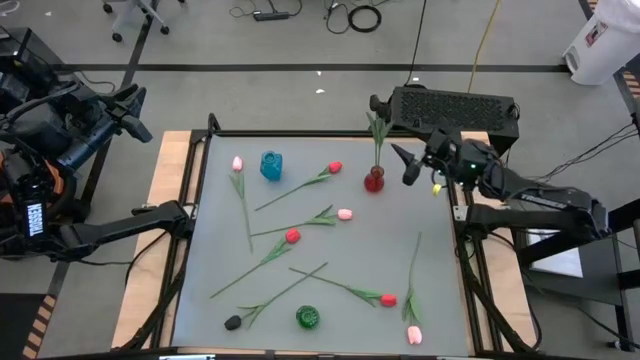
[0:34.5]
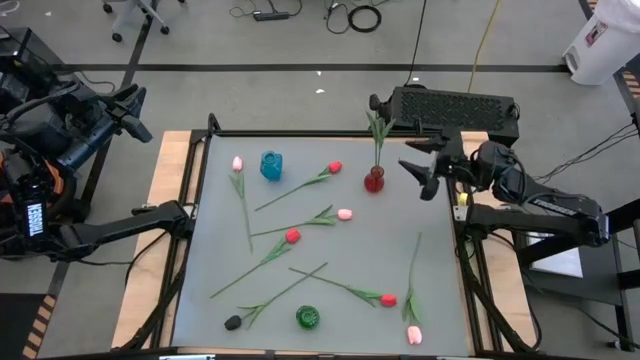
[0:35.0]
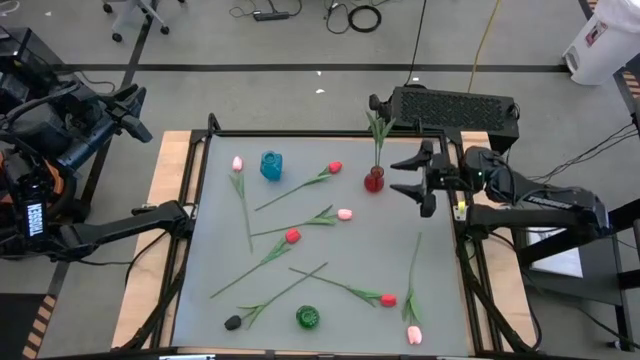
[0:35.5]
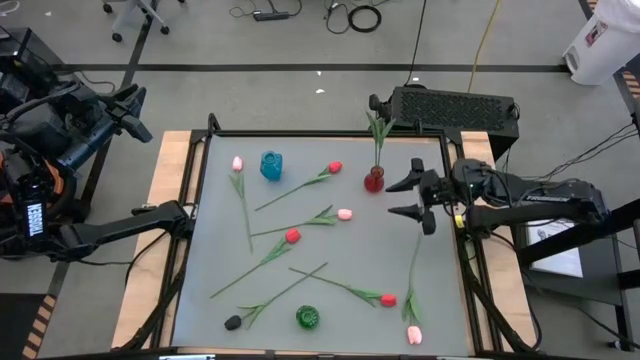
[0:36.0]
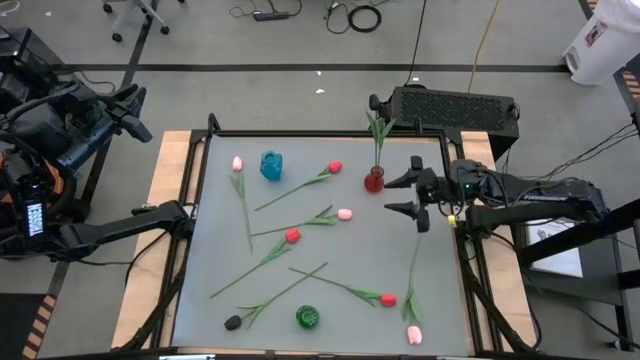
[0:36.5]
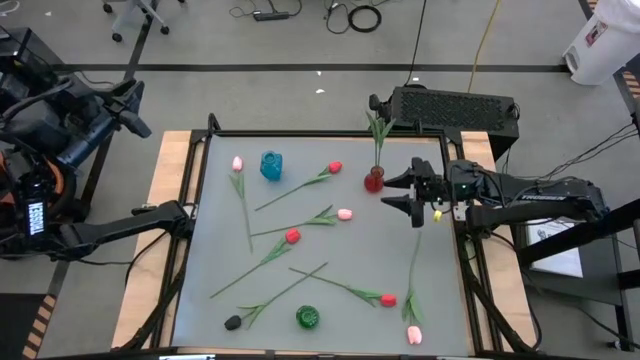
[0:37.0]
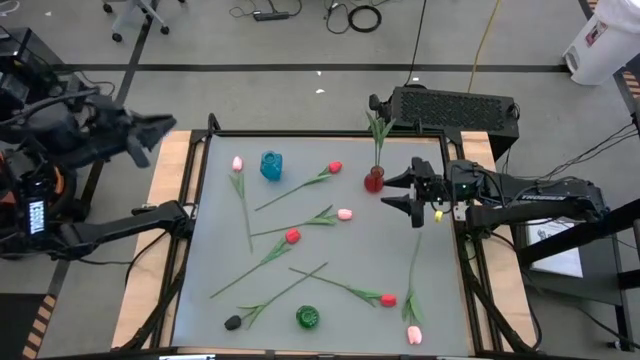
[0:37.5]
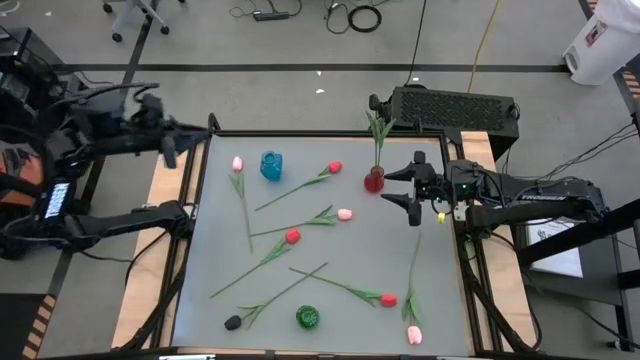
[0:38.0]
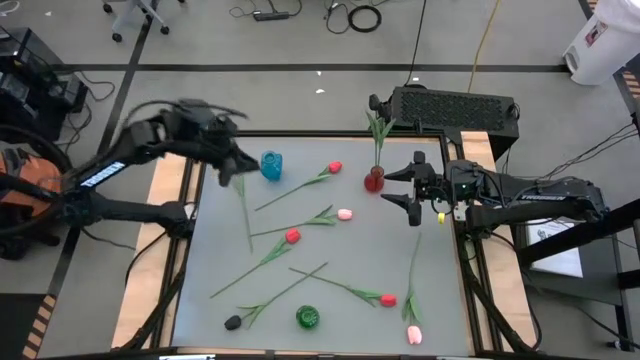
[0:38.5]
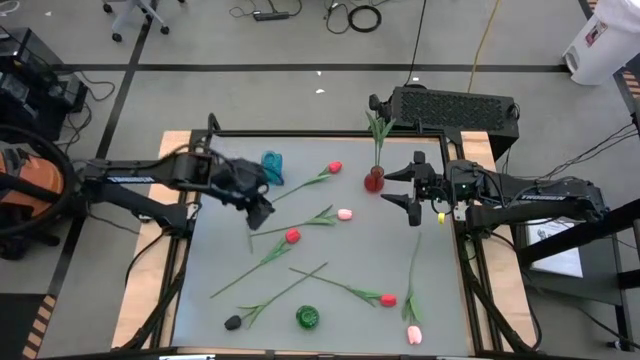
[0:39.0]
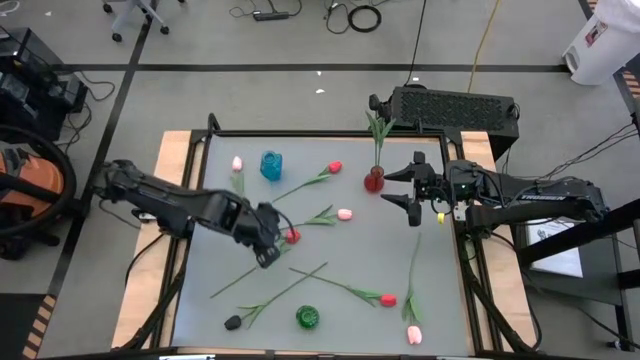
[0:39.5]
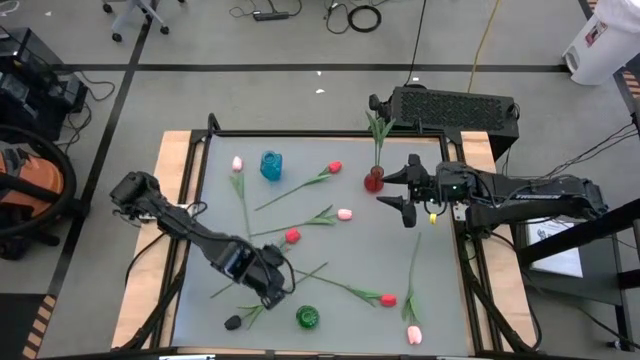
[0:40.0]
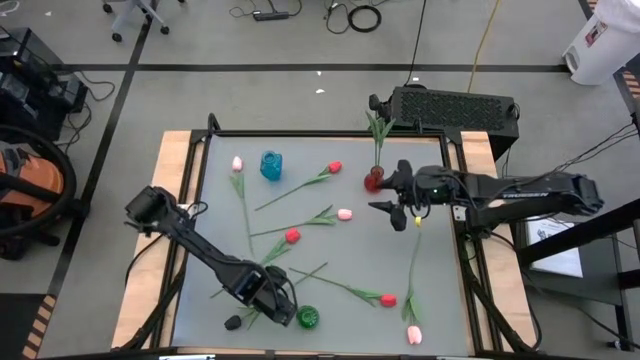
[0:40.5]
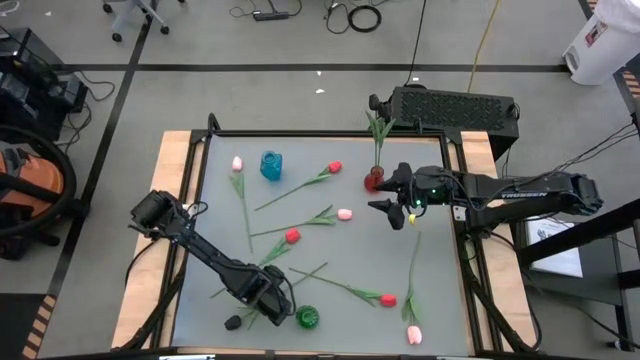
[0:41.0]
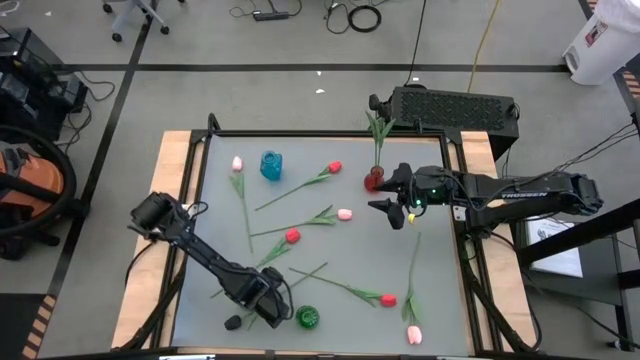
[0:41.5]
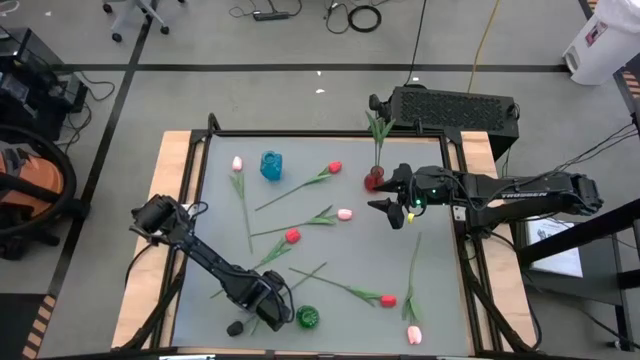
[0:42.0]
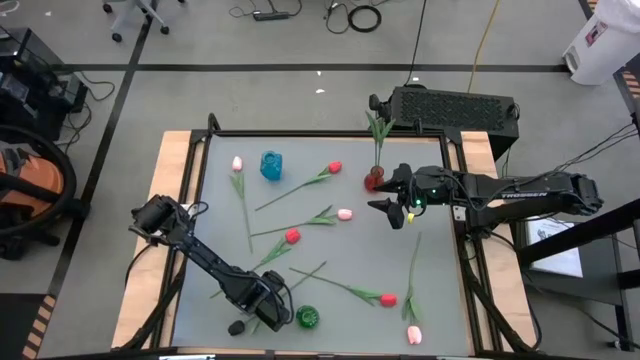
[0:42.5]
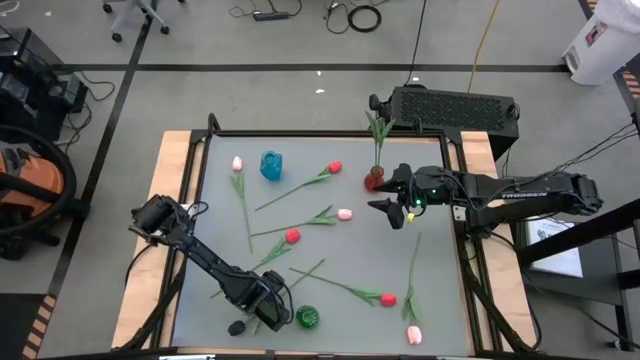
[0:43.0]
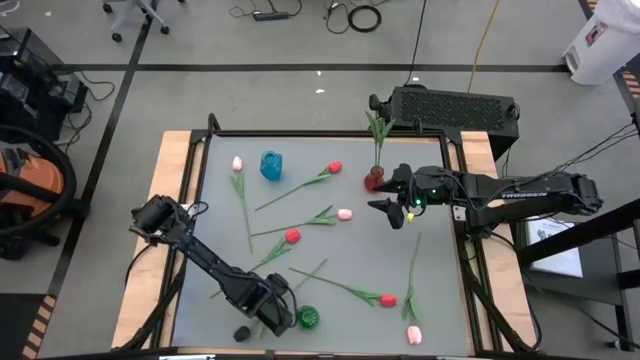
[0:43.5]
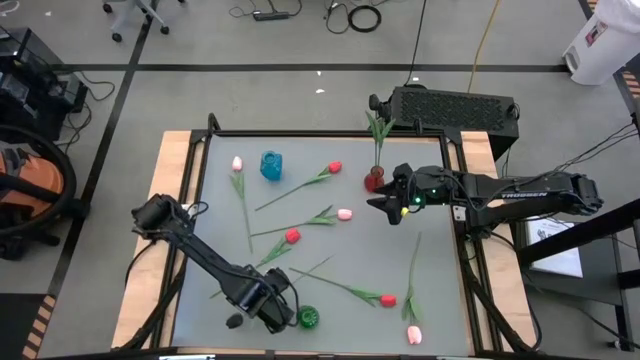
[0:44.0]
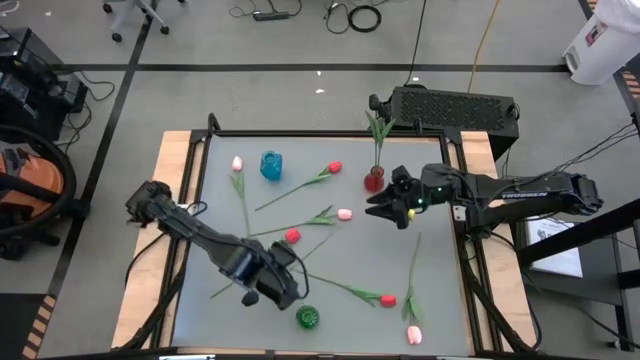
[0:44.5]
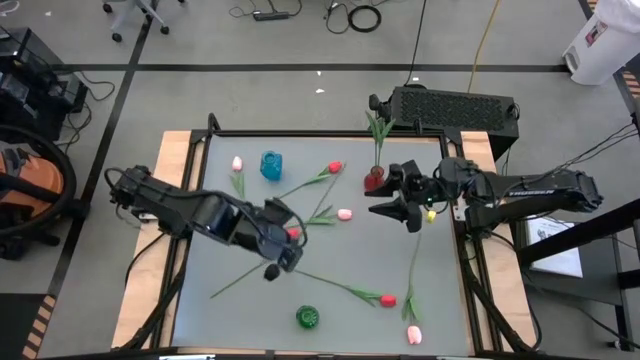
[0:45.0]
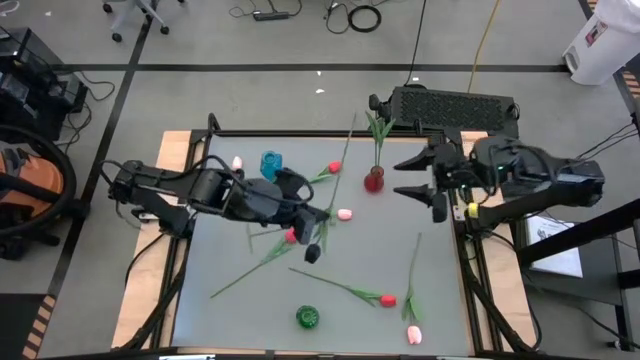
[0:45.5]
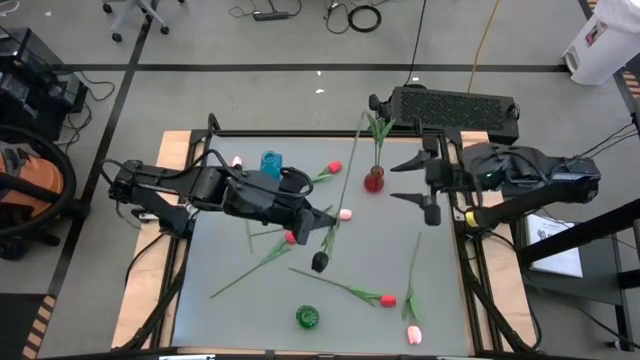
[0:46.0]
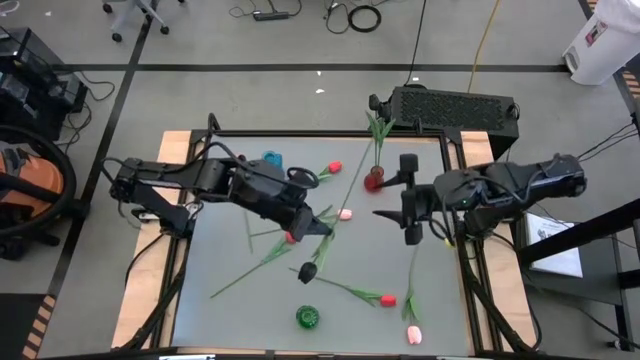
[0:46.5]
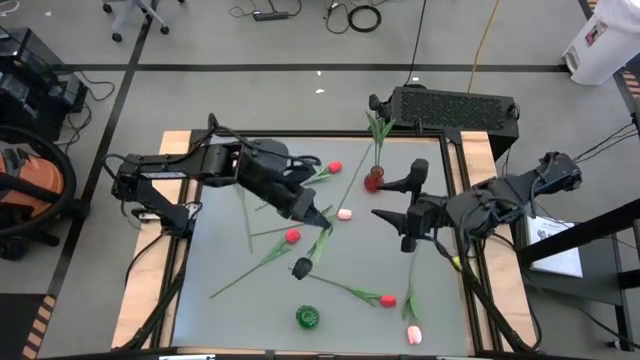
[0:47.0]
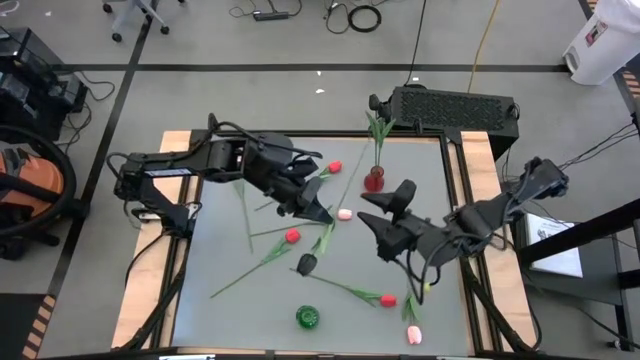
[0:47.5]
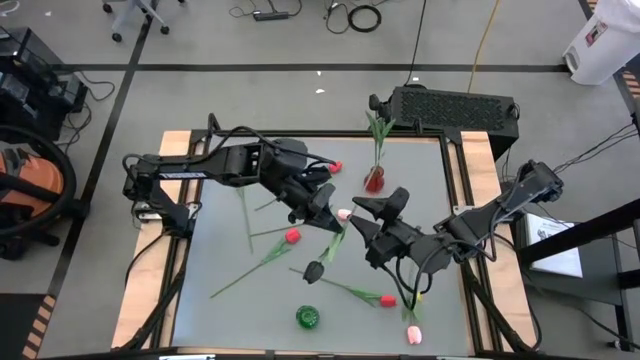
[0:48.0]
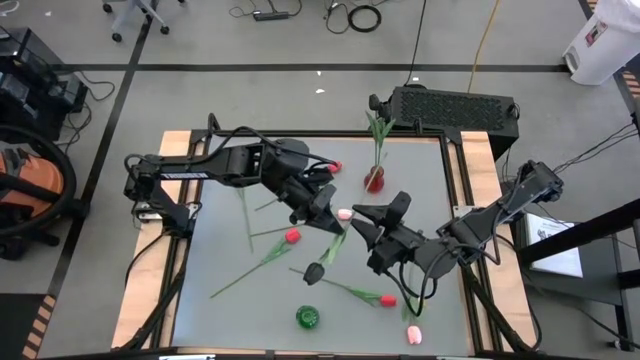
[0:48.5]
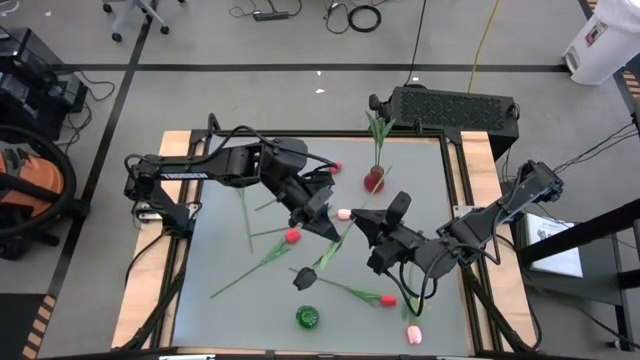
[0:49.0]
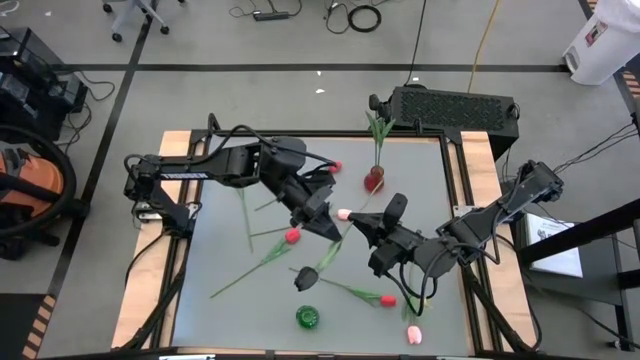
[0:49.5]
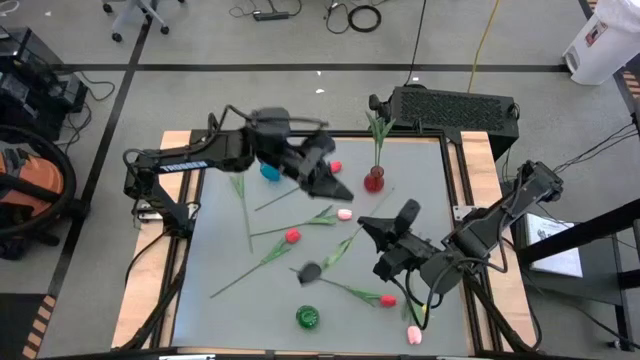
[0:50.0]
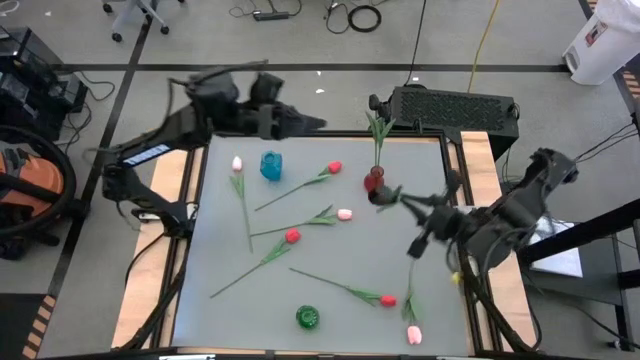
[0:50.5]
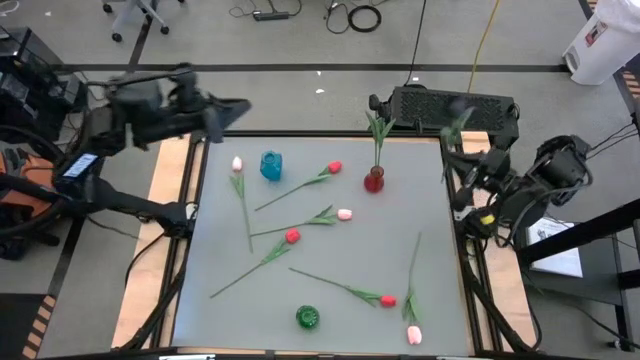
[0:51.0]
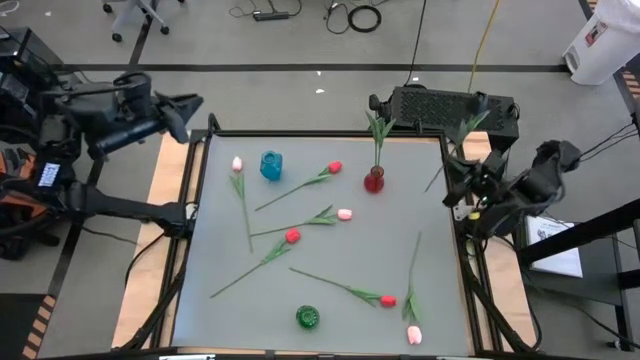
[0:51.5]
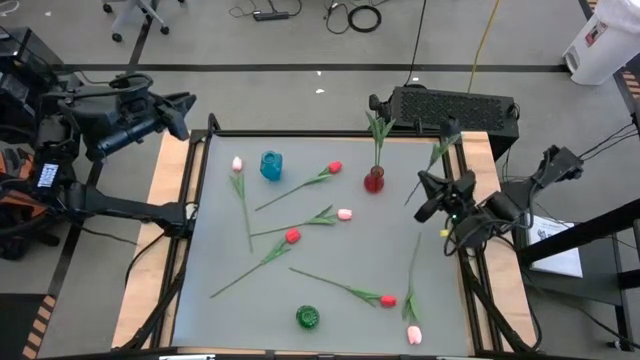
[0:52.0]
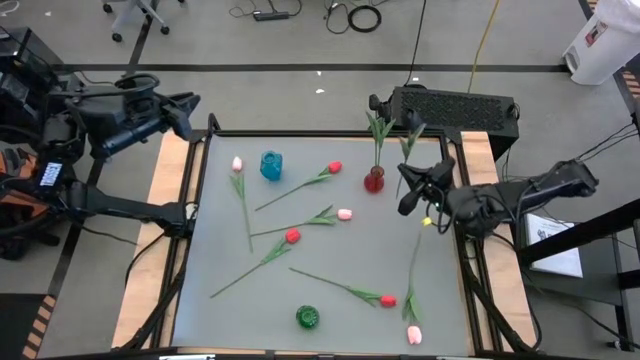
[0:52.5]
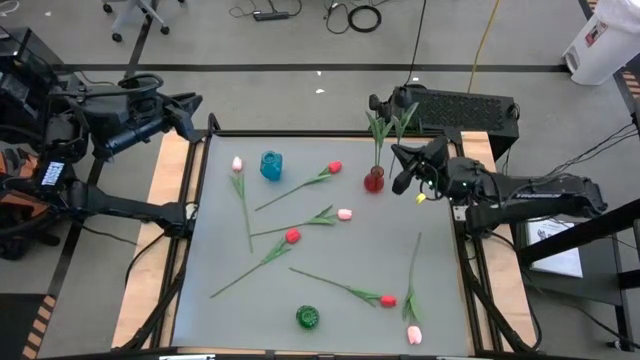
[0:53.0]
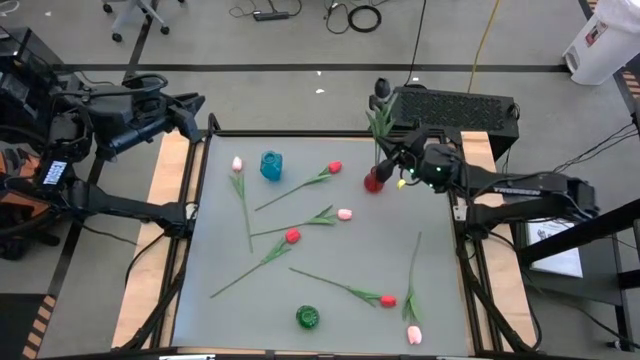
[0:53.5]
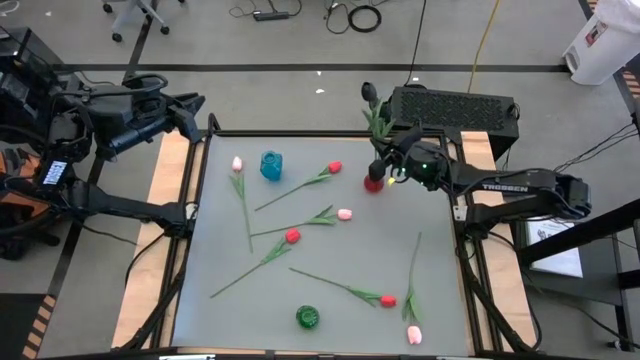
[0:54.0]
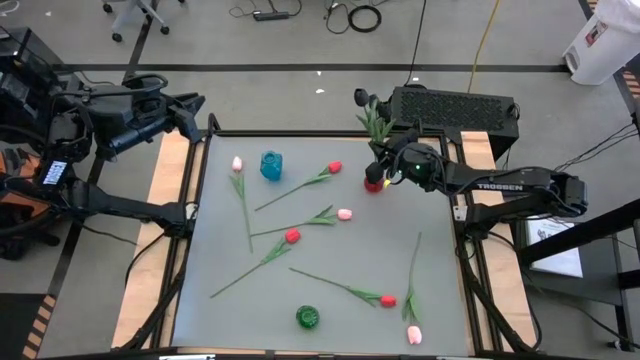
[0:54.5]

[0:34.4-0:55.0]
Task: Sort flowers into vase by color
Put the black tulip into the red vase
